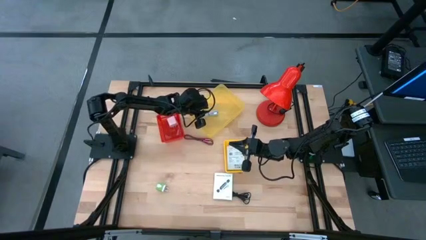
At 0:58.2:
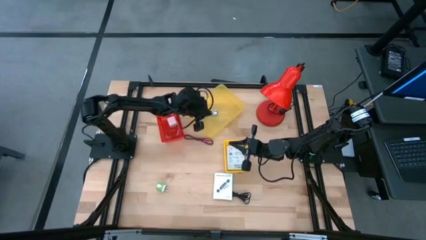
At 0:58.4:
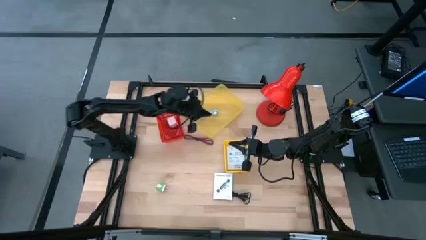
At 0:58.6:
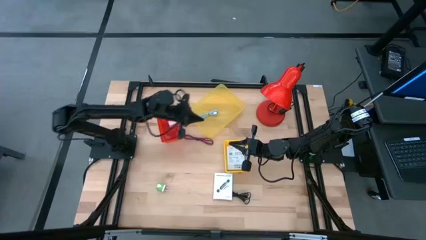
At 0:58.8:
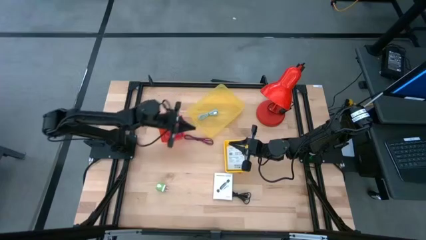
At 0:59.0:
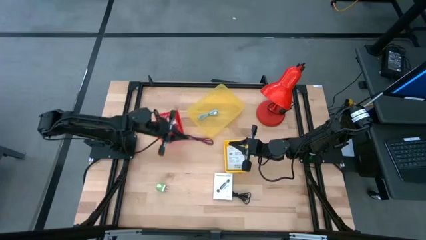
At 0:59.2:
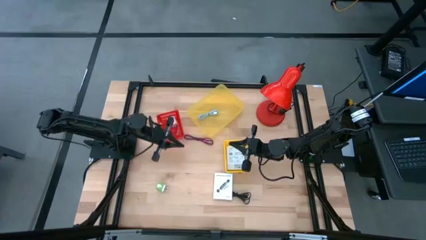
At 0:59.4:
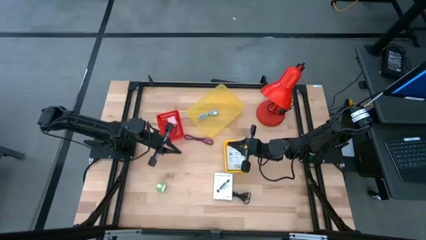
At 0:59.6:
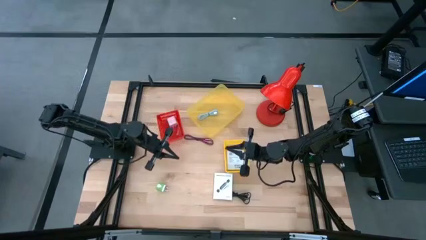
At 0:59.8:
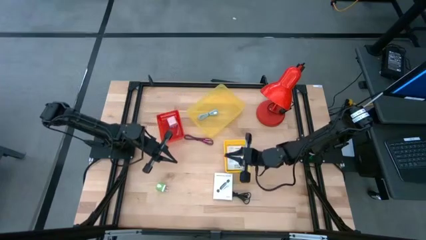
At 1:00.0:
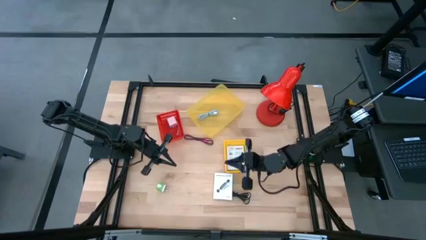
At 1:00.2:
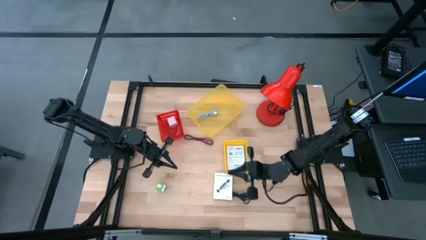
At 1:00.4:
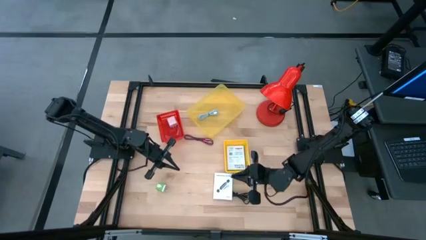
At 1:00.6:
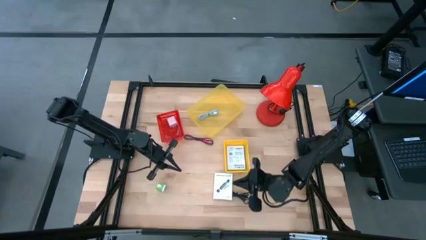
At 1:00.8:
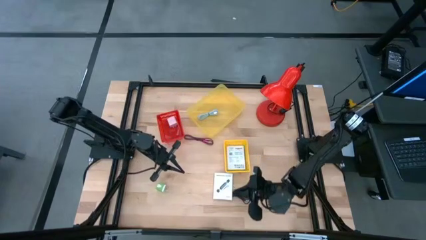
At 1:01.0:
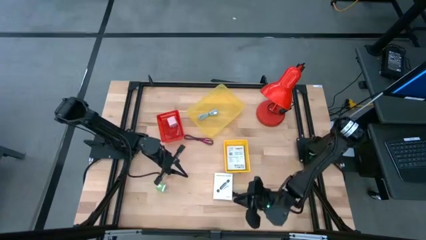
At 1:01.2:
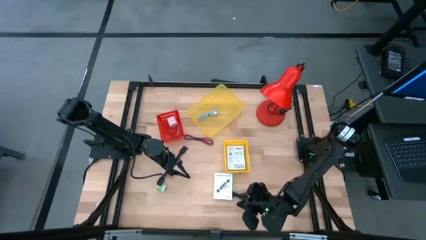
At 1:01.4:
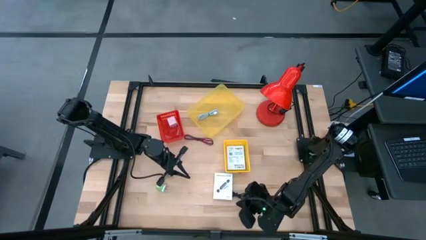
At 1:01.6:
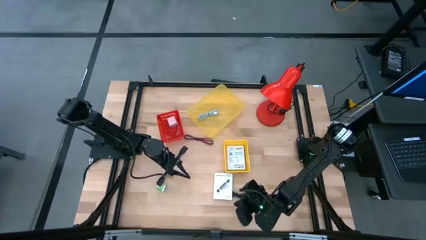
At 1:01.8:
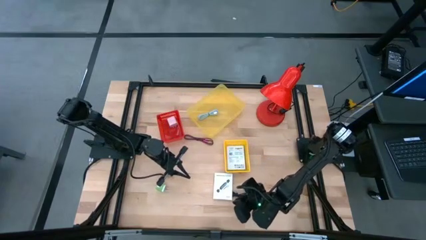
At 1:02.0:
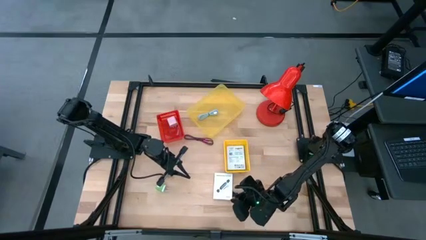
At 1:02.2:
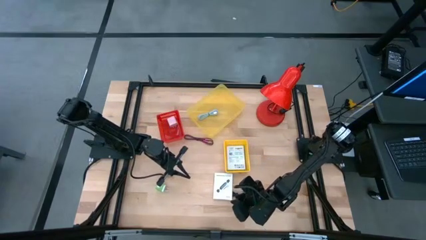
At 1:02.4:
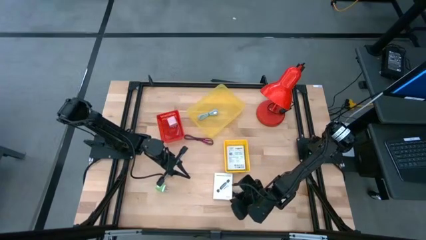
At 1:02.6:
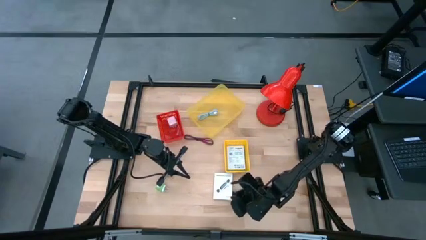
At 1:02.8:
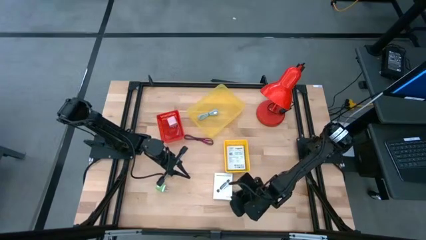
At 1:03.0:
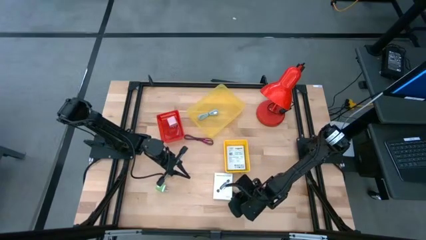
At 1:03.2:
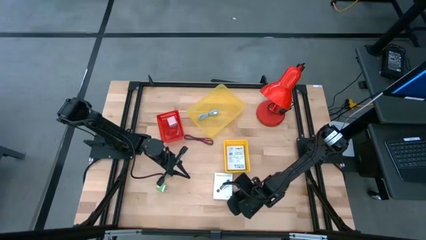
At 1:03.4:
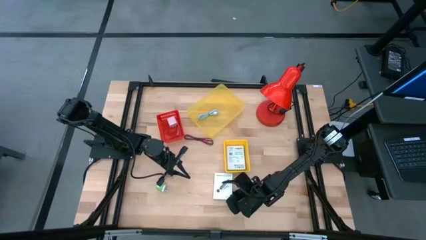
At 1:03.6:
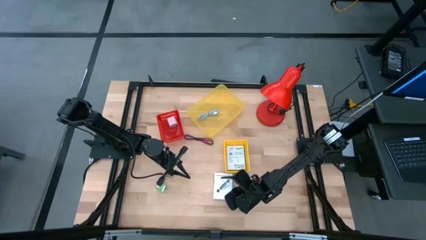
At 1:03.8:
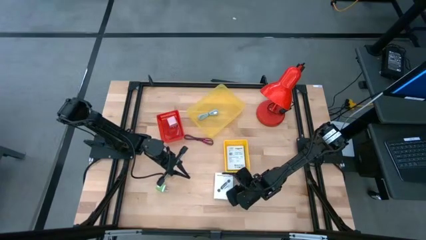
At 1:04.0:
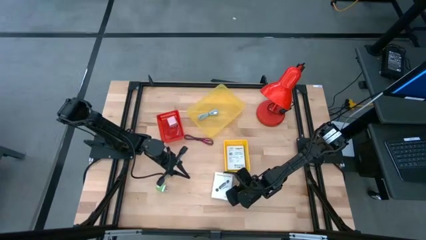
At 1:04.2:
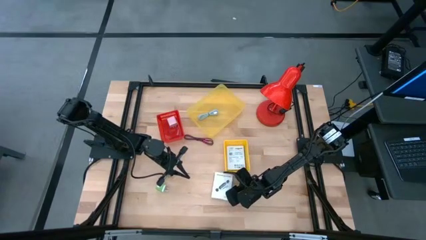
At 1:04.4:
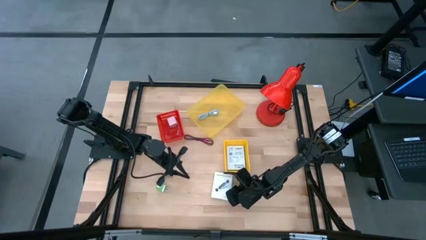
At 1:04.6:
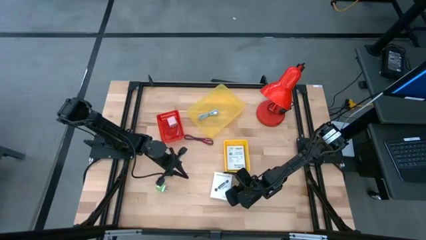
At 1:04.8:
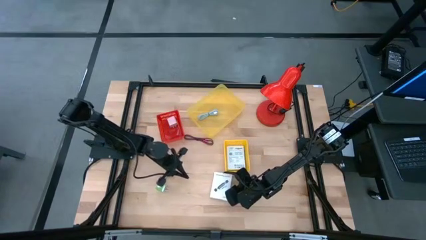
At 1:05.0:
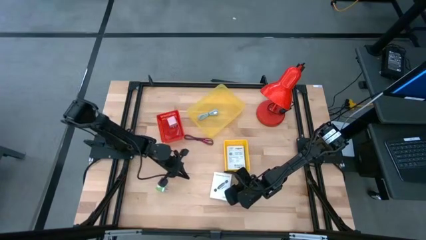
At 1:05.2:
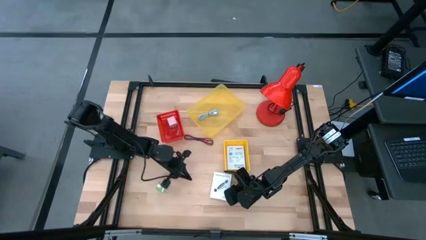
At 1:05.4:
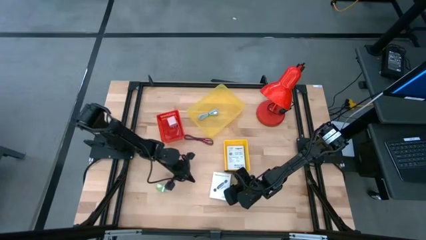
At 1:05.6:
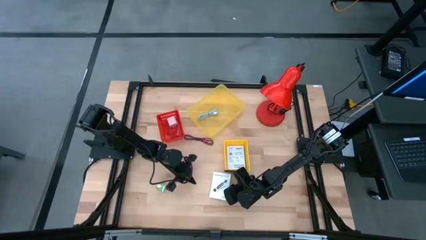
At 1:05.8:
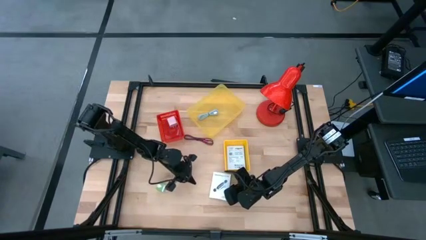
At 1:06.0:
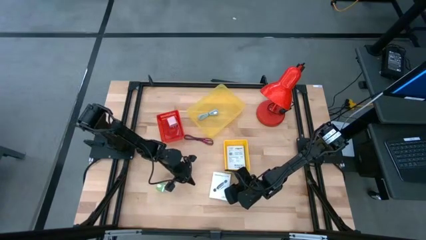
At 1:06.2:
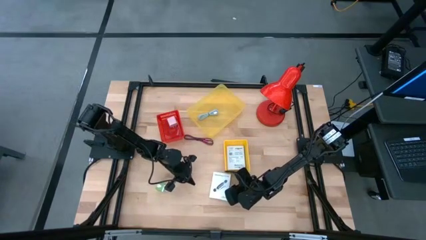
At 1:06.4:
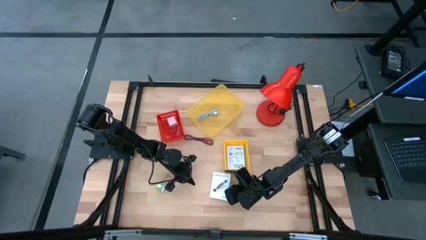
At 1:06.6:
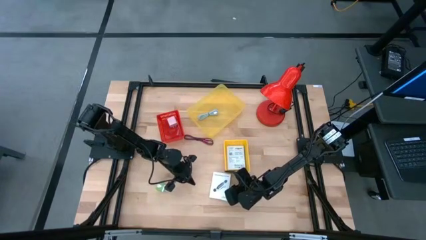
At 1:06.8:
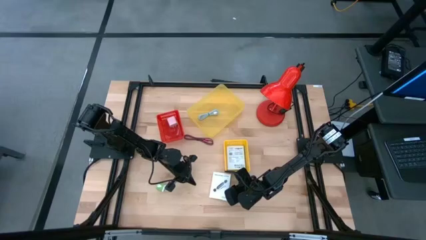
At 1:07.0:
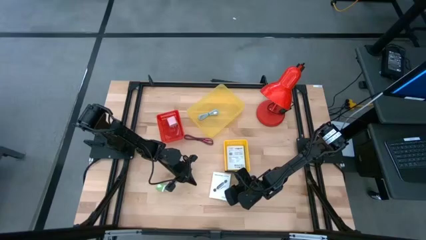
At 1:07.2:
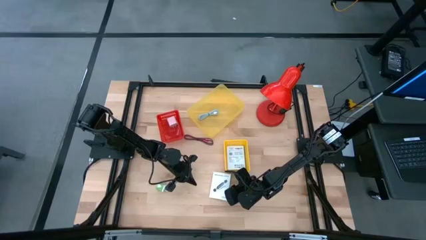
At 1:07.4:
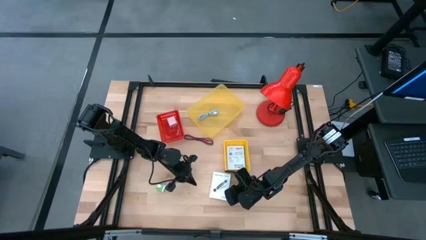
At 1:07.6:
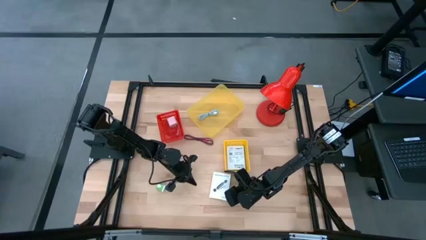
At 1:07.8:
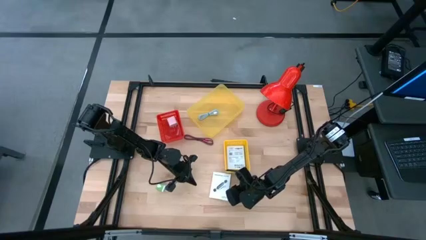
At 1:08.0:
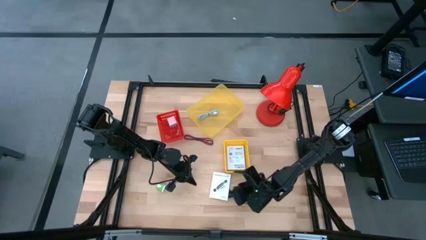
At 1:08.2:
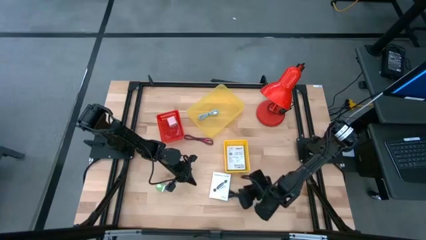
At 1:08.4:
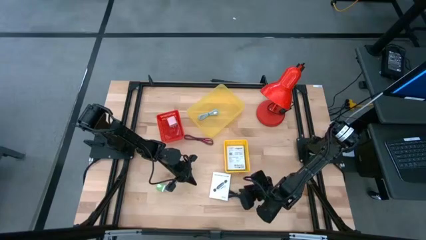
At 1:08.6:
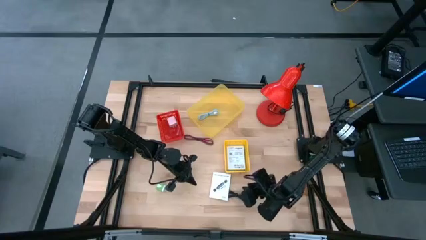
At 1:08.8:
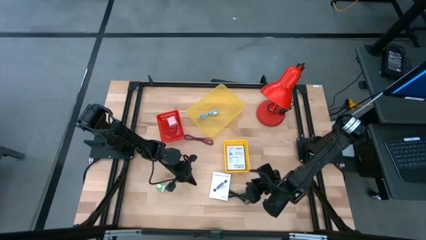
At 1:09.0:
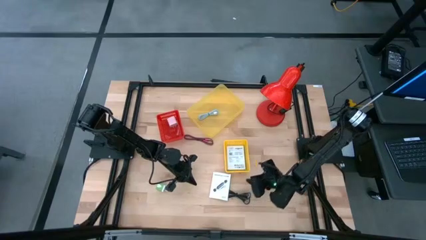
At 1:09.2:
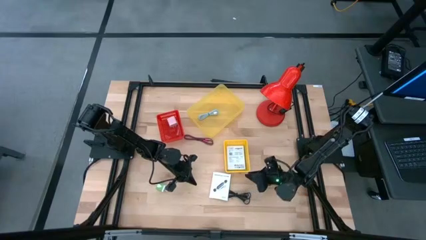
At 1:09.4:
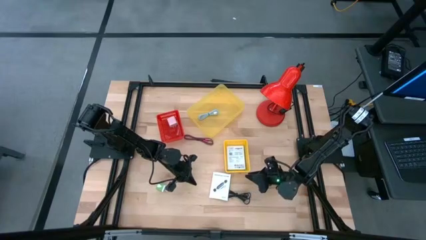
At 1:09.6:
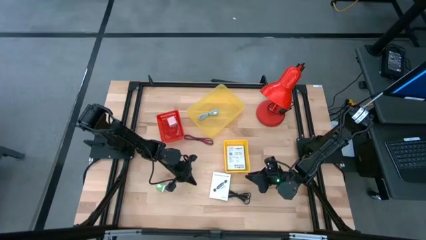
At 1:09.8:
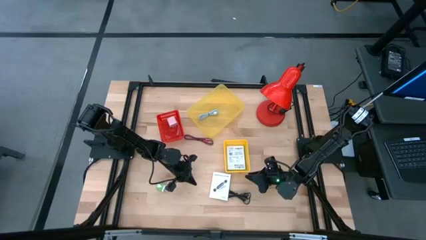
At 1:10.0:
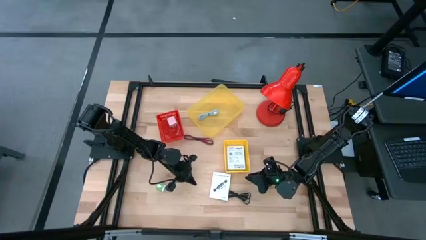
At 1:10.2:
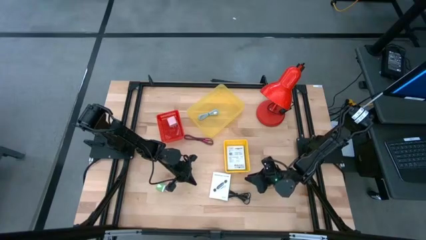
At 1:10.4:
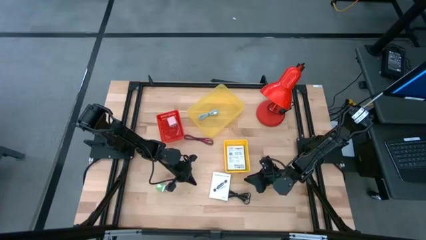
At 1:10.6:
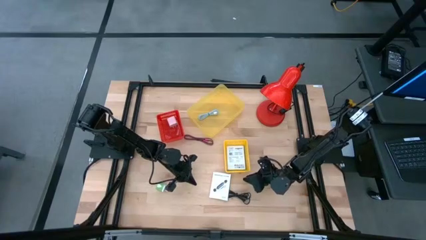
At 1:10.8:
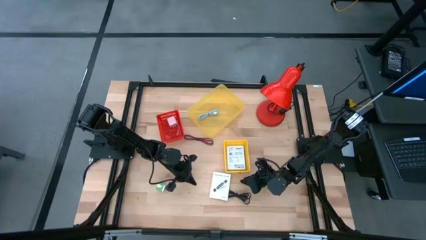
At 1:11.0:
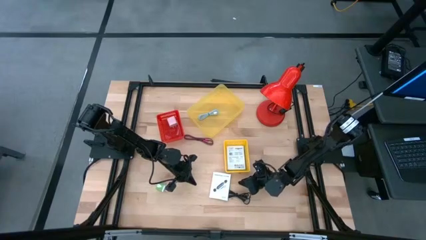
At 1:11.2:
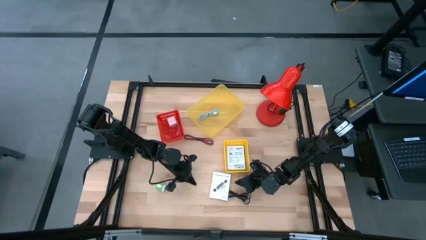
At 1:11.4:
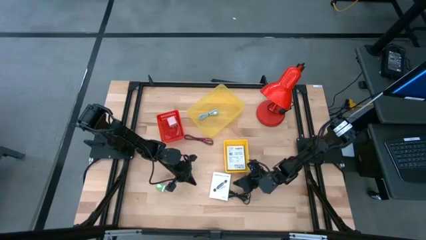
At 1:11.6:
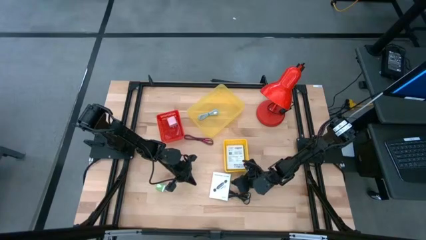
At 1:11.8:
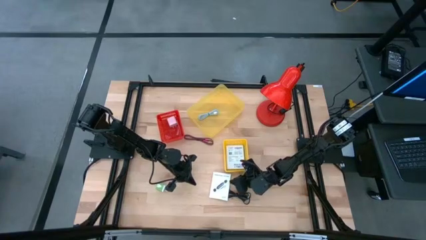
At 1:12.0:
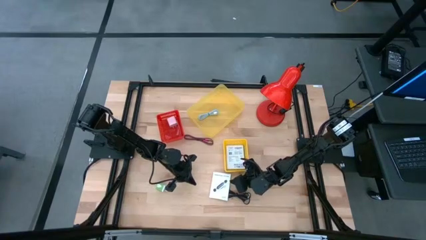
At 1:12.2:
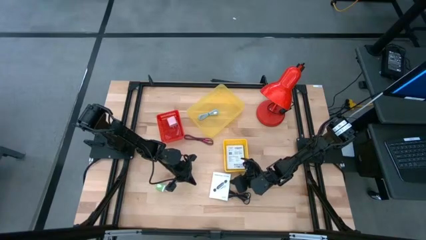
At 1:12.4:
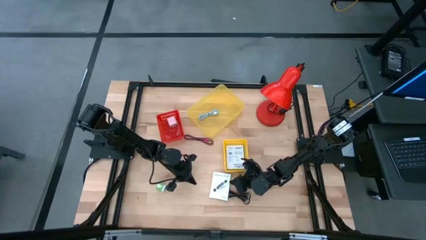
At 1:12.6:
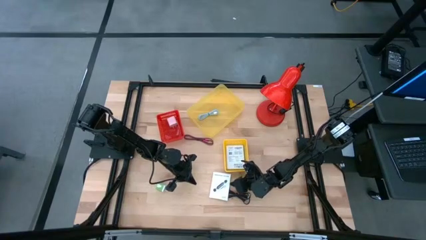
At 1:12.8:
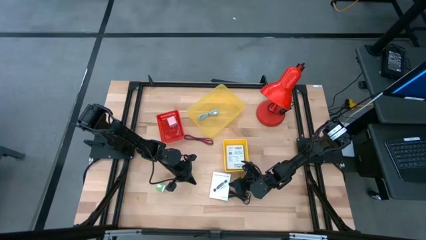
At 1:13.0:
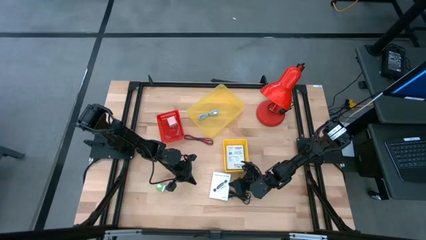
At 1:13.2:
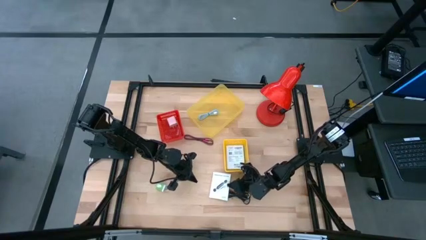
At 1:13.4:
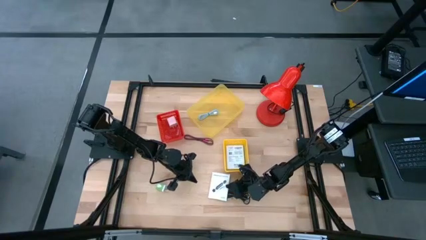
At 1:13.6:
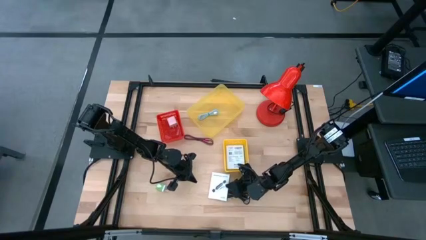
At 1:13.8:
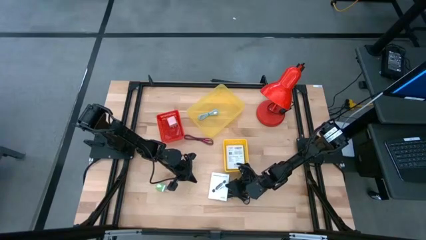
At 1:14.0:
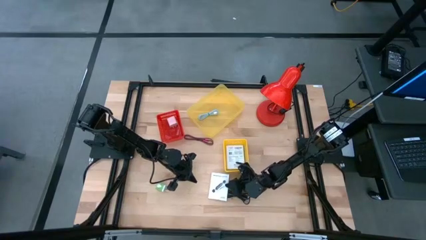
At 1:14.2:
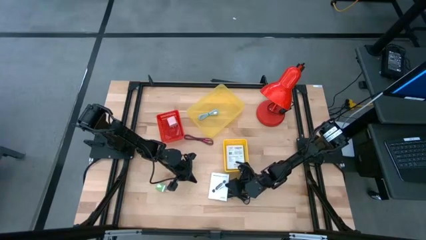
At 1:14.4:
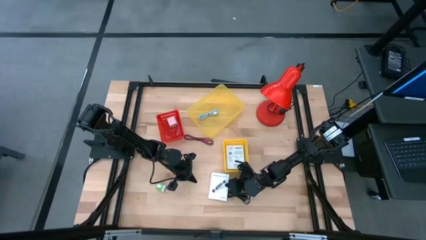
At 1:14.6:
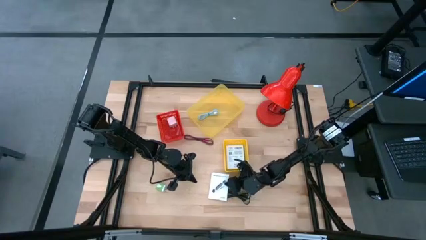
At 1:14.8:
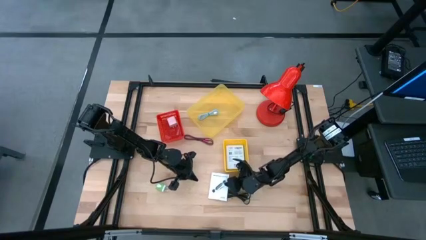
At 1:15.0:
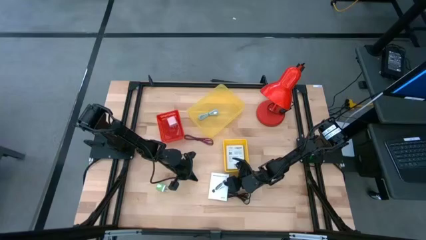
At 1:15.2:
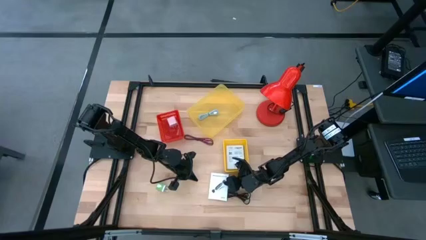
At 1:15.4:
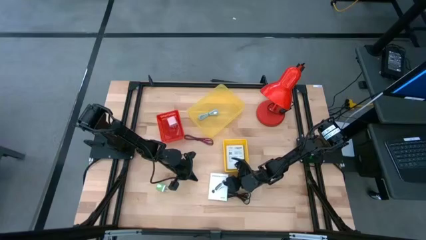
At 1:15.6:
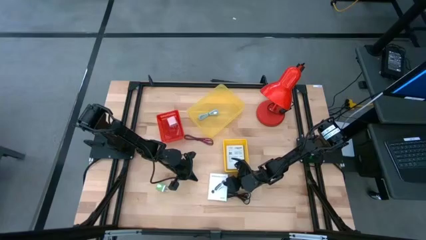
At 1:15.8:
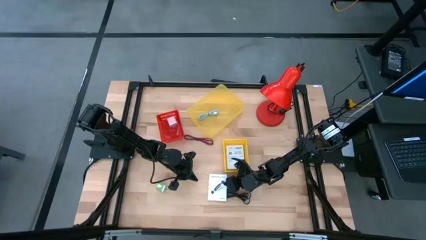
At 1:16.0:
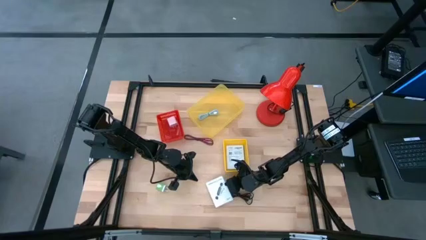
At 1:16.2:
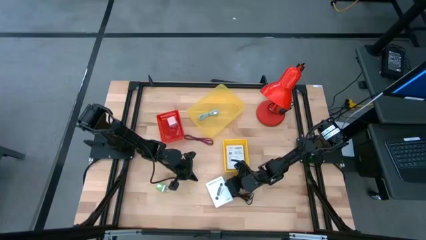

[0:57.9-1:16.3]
Task: Pick and place items into bin
Stack the white box on top of the white box
